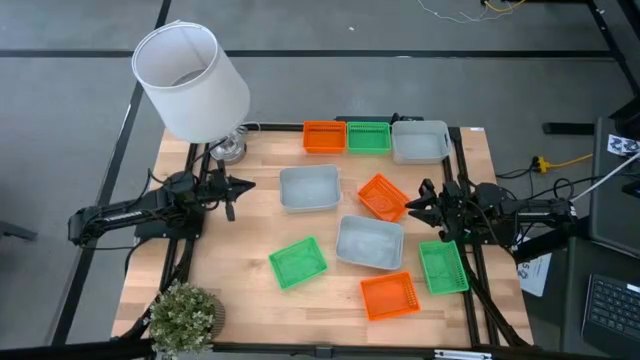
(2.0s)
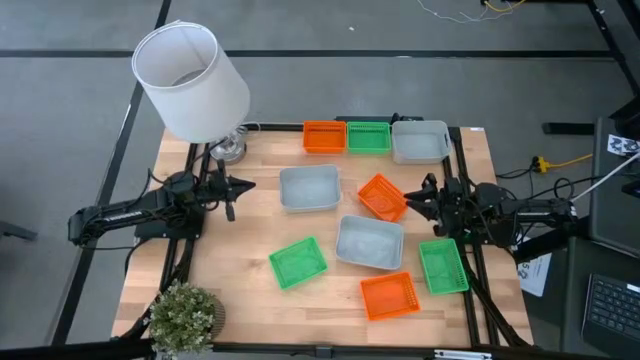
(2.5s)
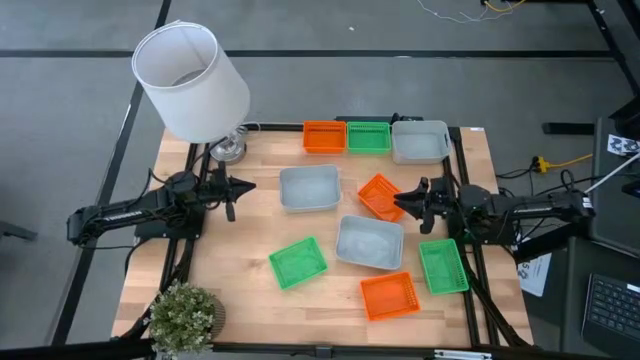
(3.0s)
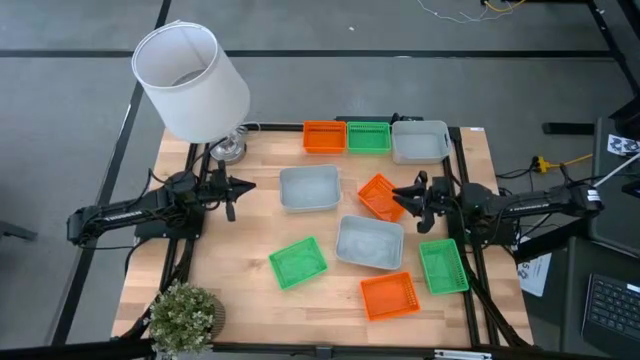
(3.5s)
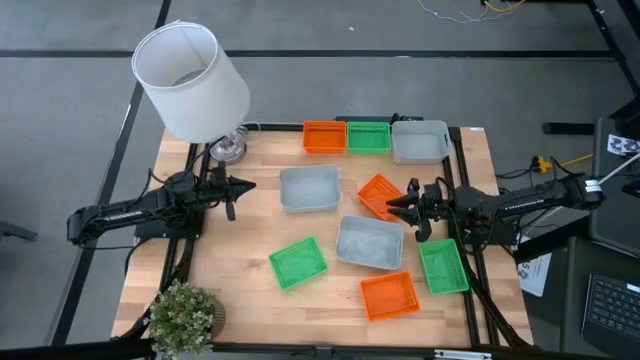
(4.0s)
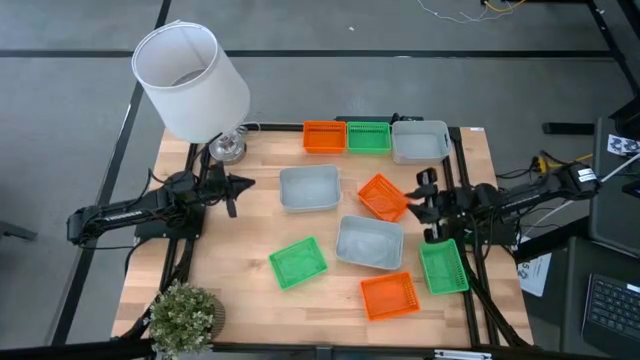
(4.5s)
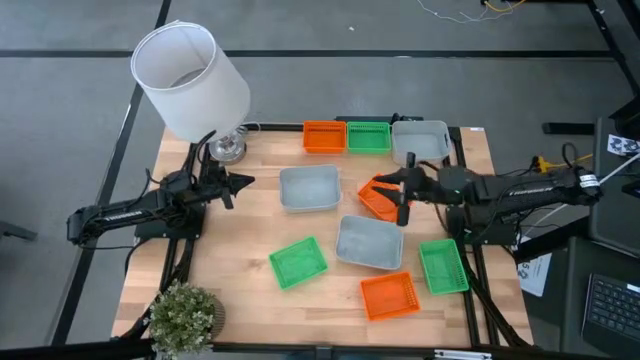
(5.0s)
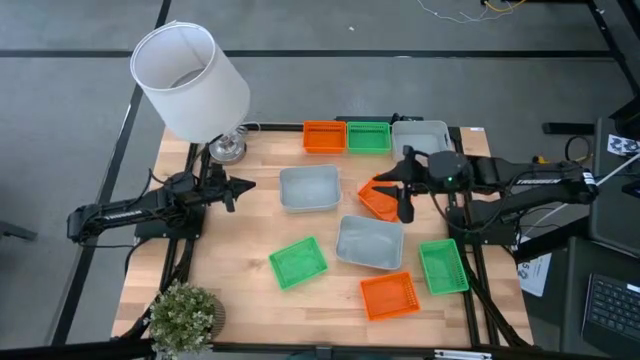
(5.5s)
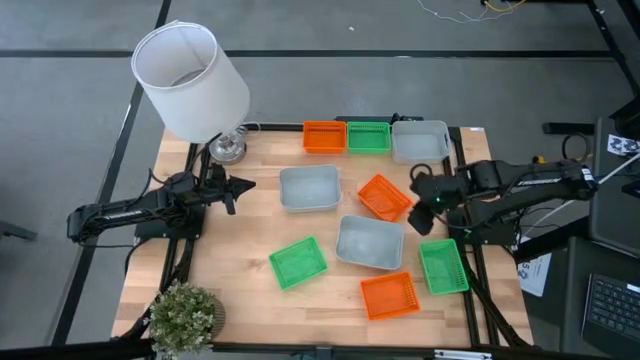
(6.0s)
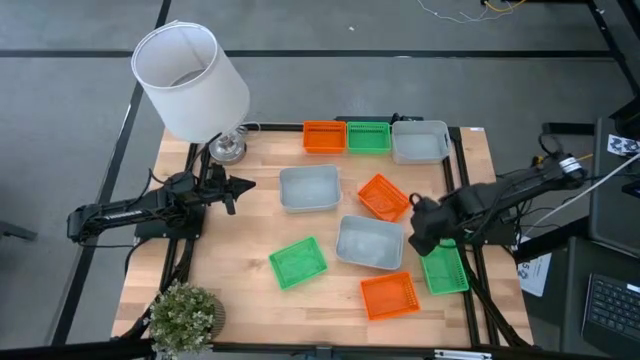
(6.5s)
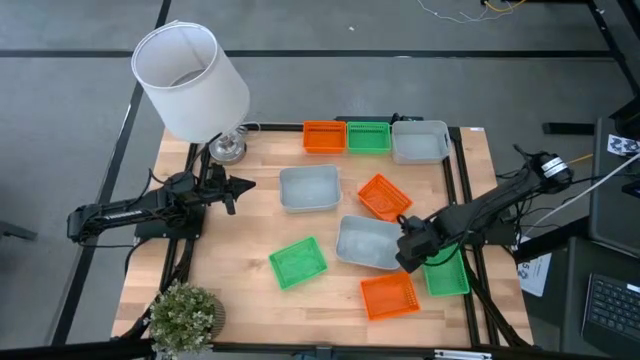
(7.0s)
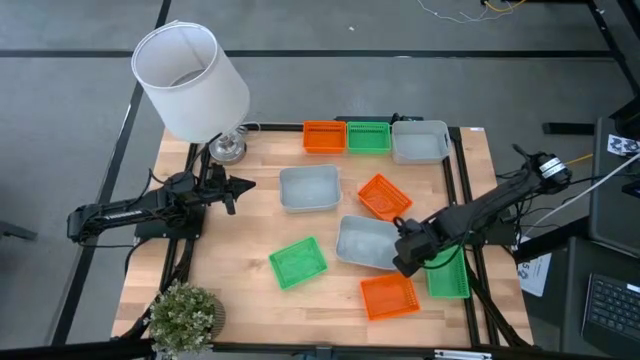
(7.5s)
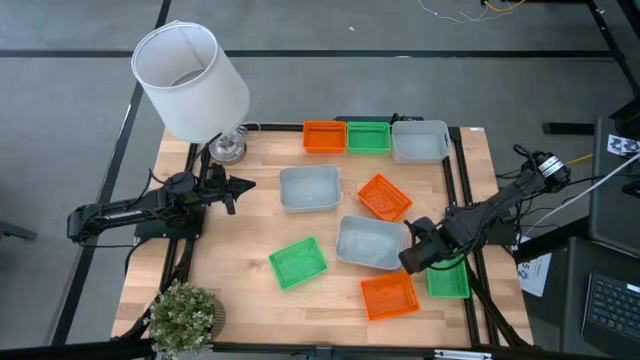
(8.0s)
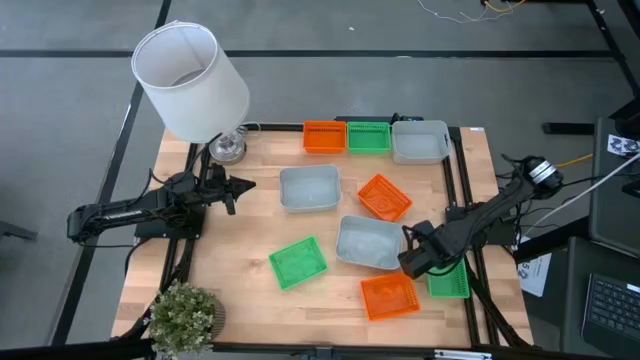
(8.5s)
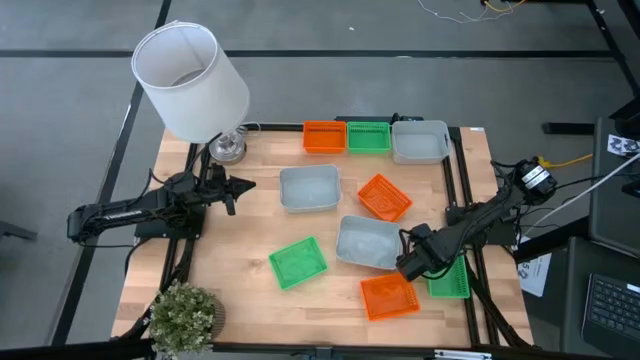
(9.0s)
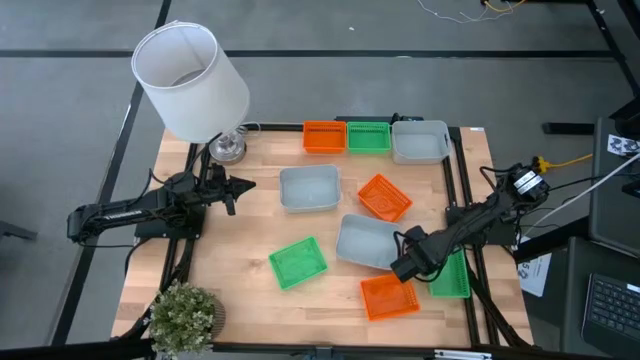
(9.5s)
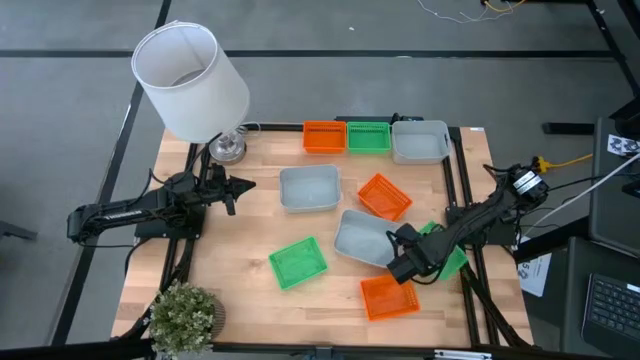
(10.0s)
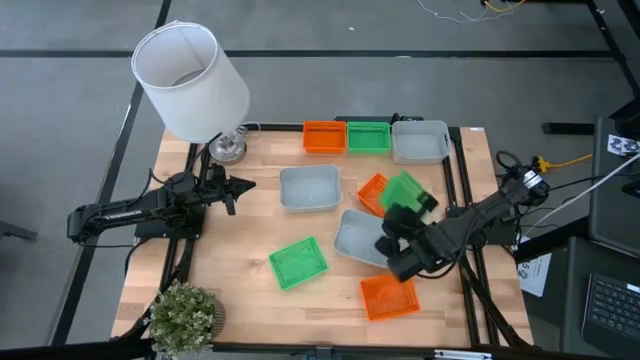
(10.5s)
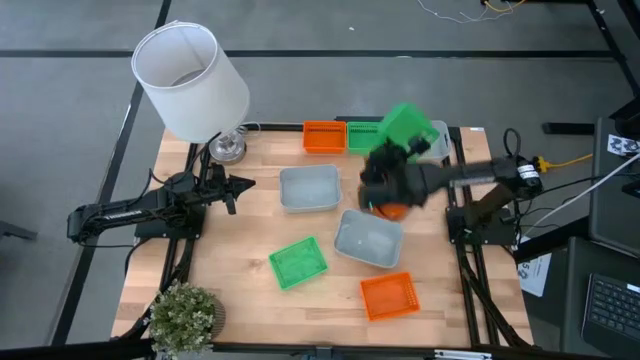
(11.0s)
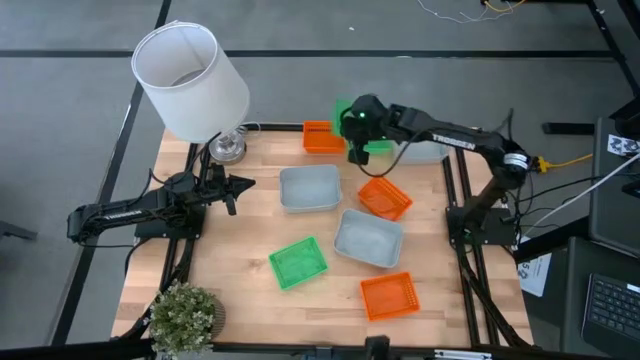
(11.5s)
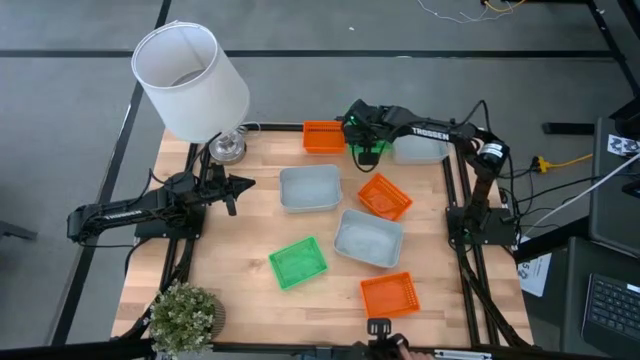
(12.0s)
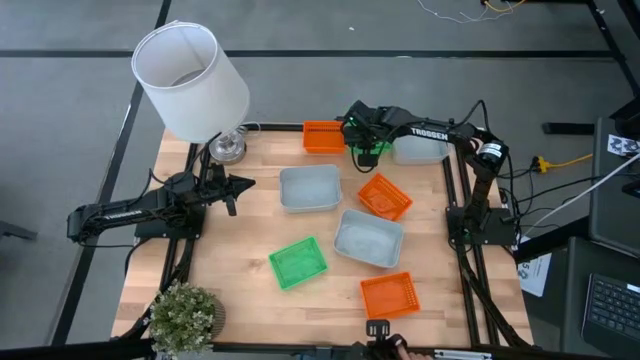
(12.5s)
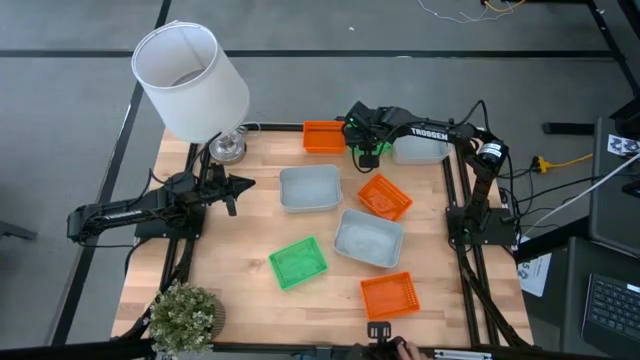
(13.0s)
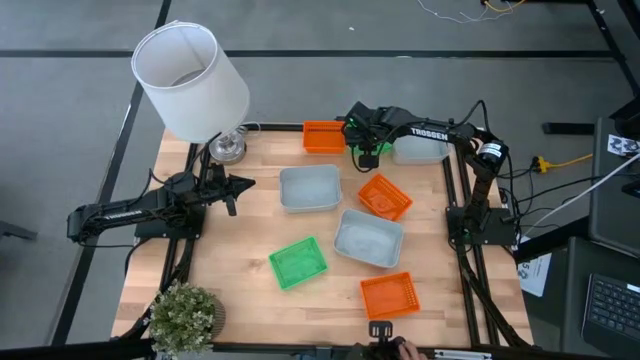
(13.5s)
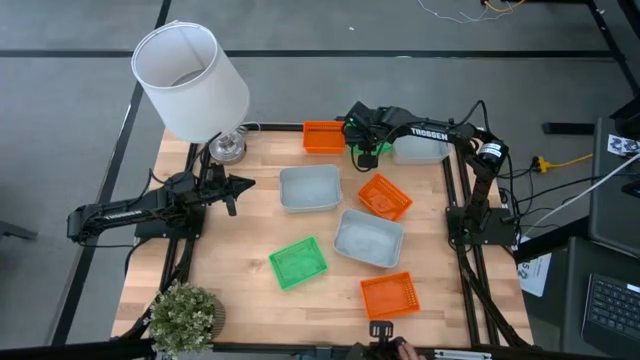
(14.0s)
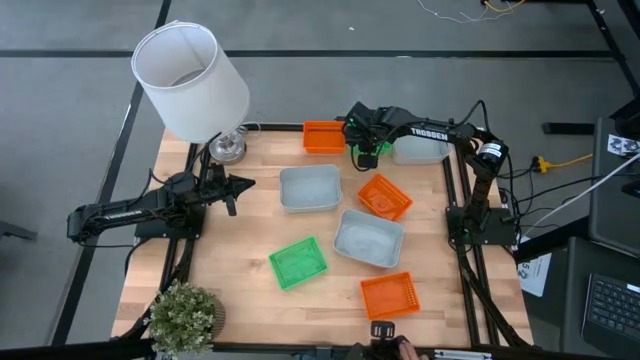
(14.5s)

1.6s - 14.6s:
Stack the right green bin on the top green bin

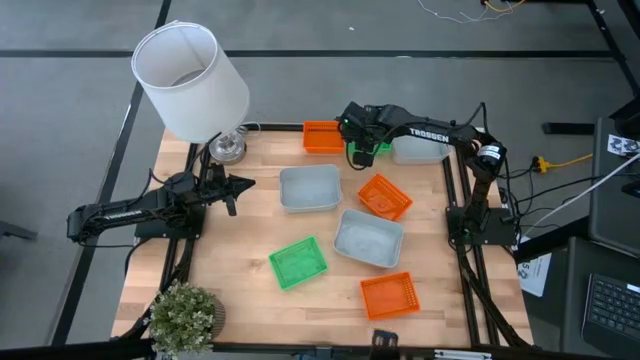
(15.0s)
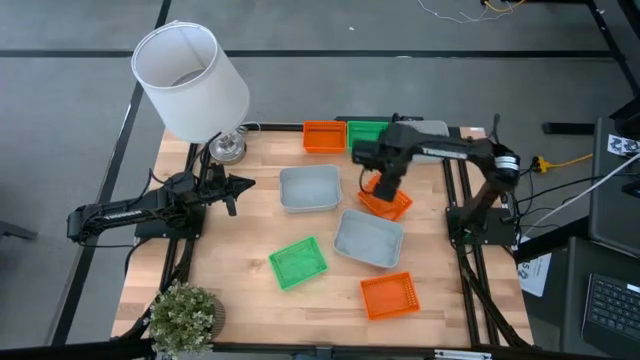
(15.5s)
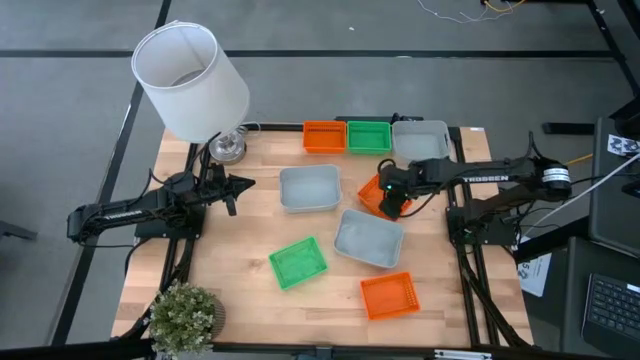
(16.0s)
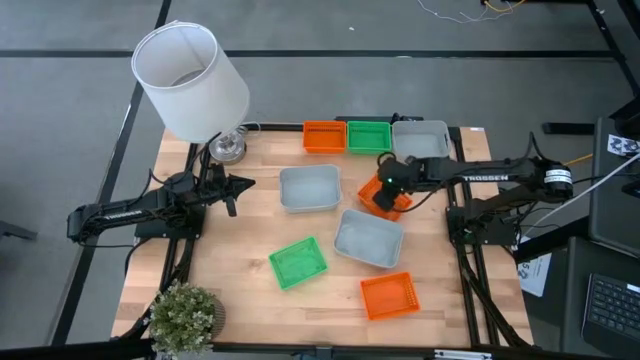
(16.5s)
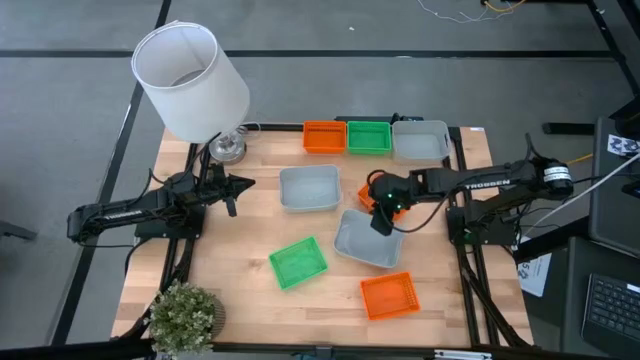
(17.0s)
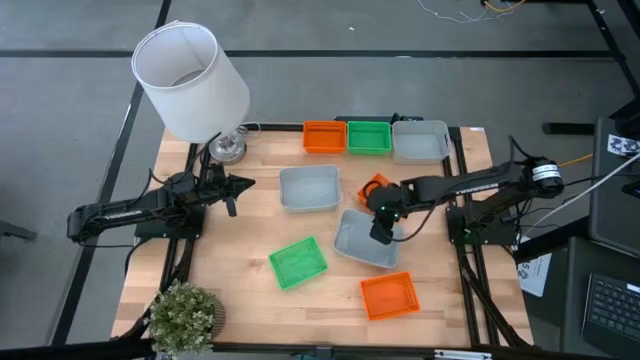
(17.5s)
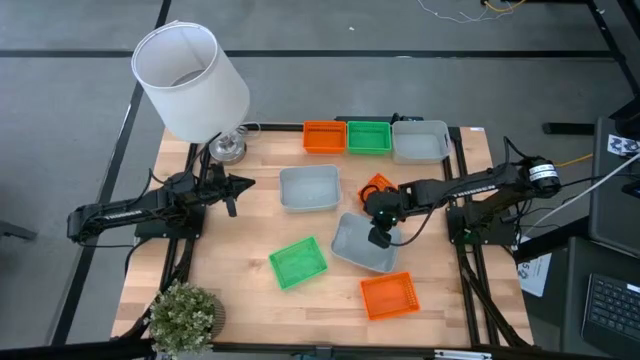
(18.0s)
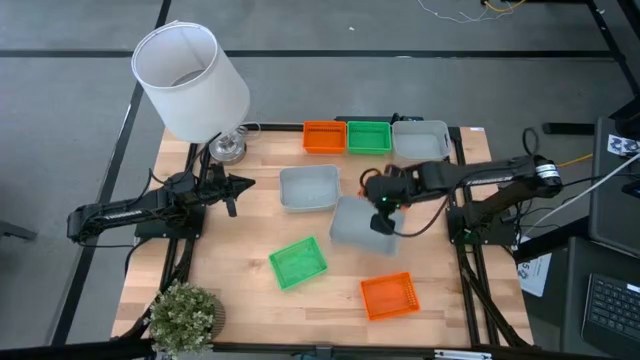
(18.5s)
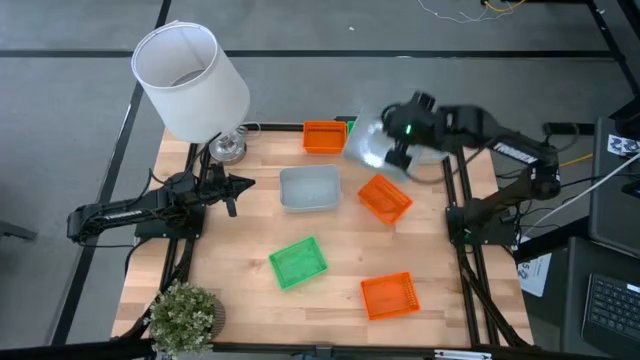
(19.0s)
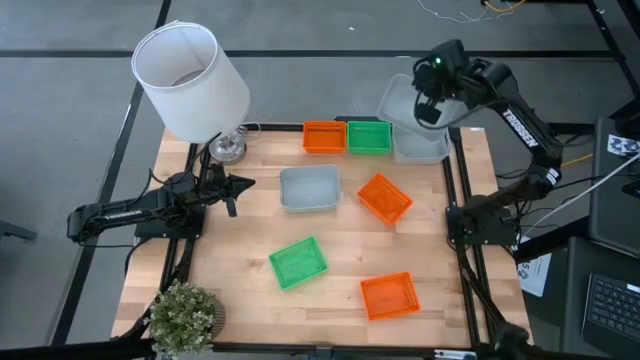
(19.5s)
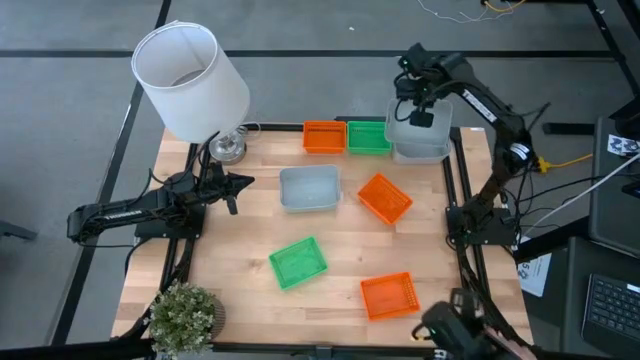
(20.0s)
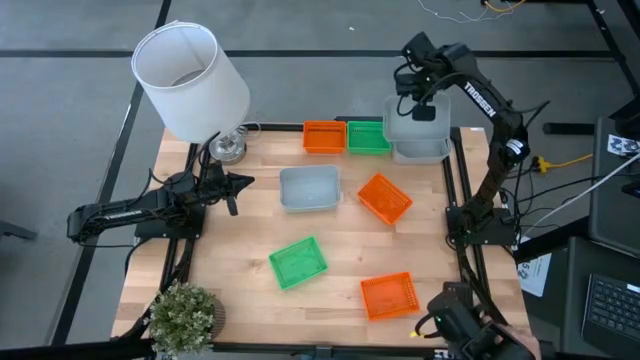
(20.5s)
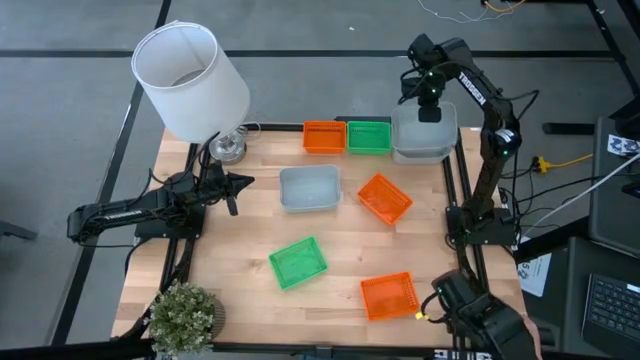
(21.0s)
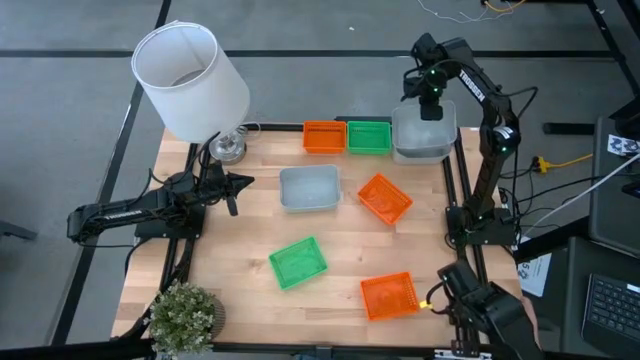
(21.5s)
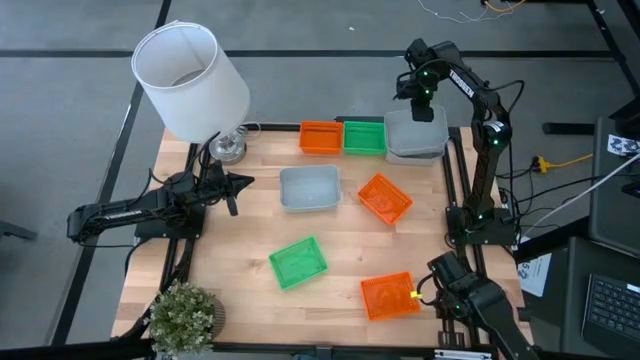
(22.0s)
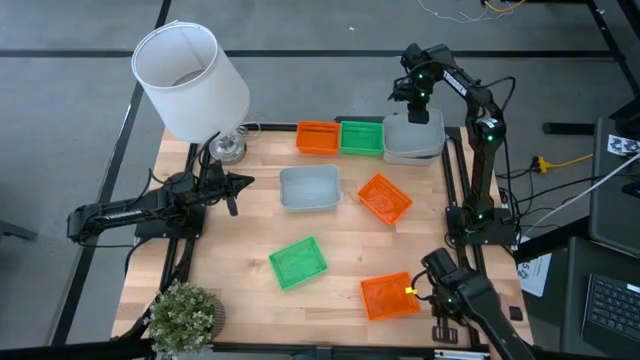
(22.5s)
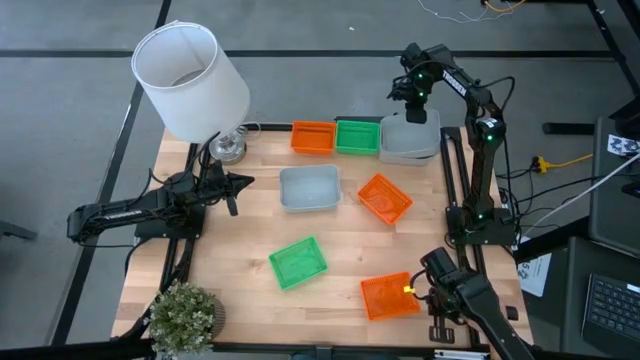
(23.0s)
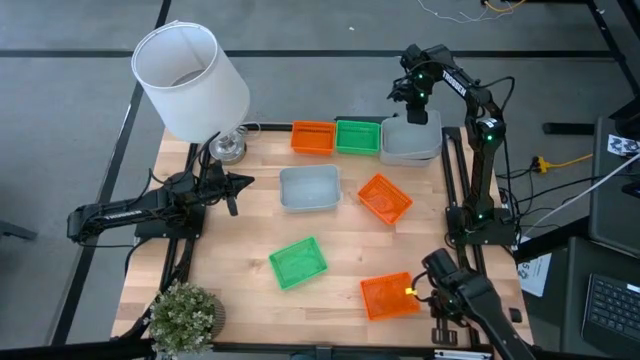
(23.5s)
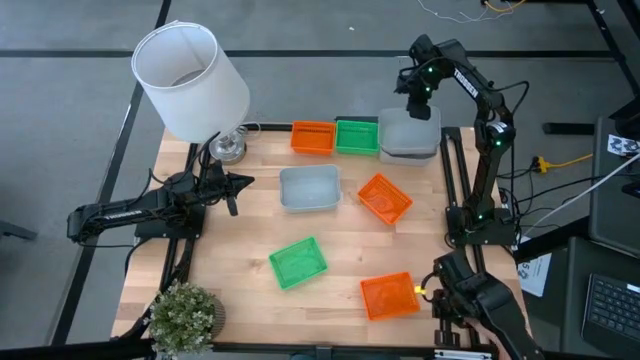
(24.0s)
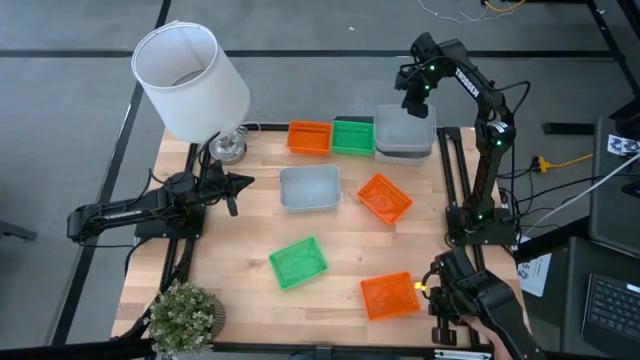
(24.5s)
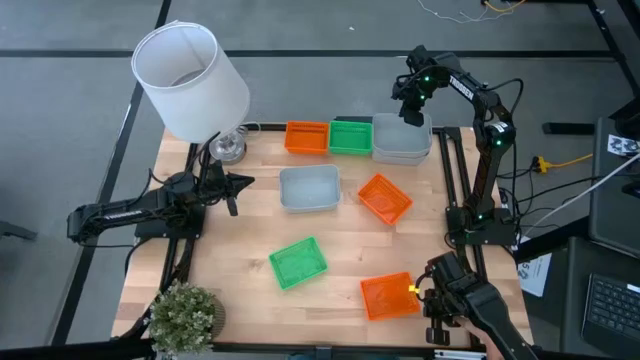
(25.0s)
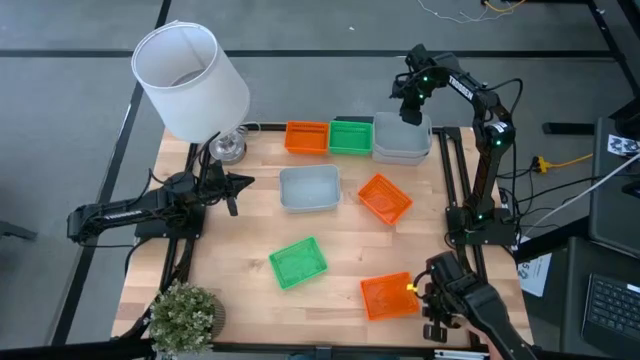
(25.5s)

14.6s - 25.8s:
Stack the bottom gray bin on the top gray bin
